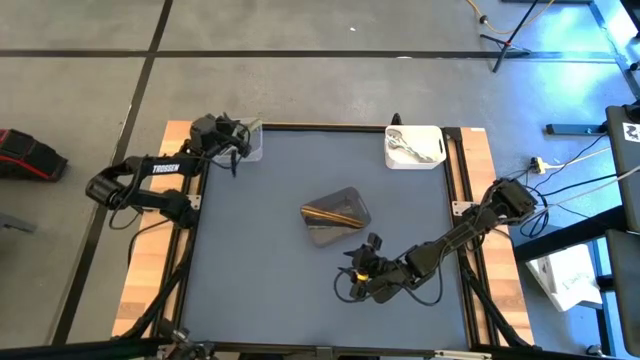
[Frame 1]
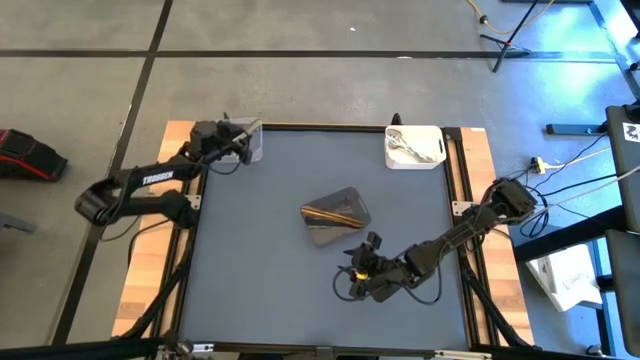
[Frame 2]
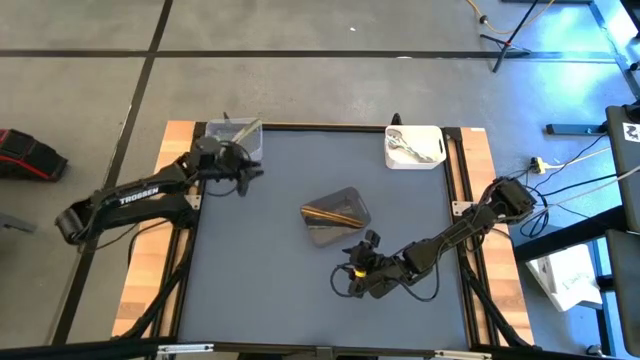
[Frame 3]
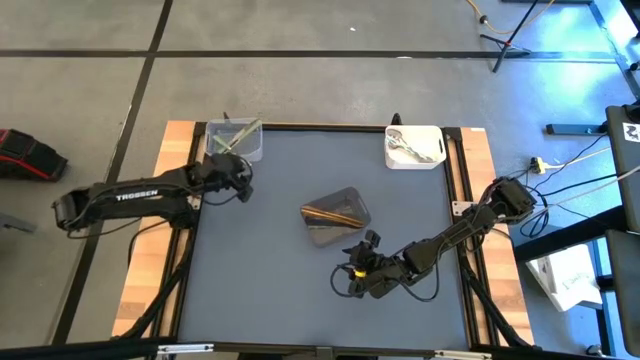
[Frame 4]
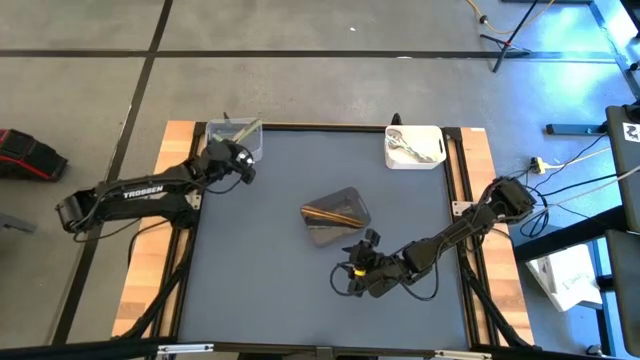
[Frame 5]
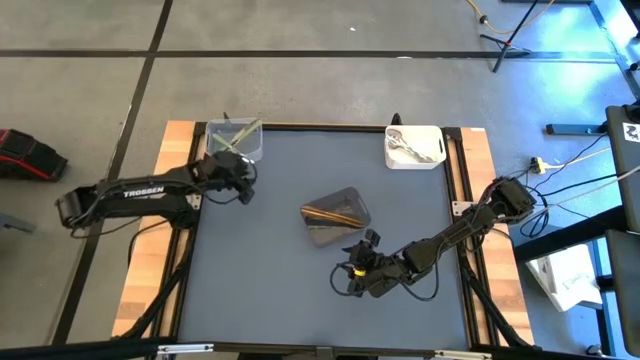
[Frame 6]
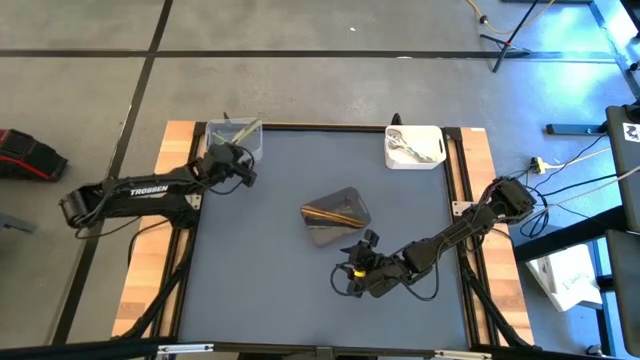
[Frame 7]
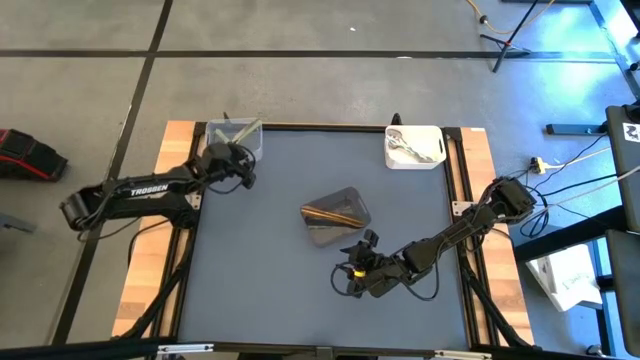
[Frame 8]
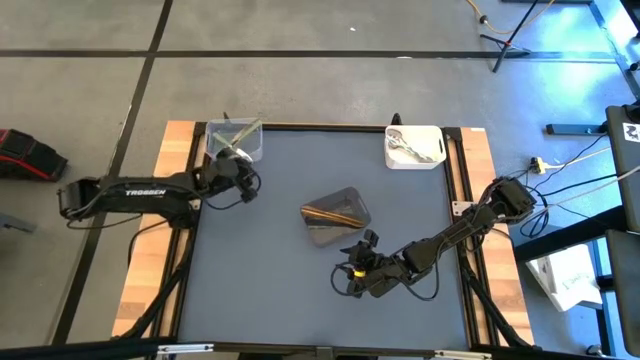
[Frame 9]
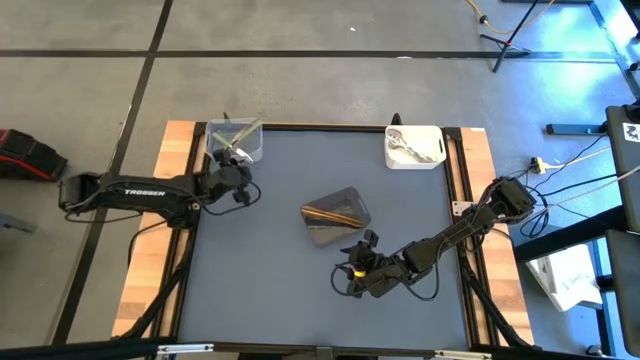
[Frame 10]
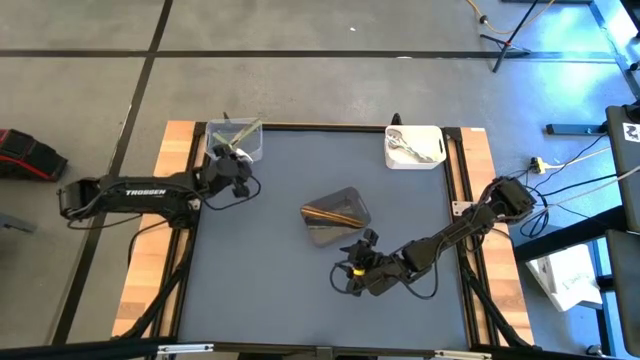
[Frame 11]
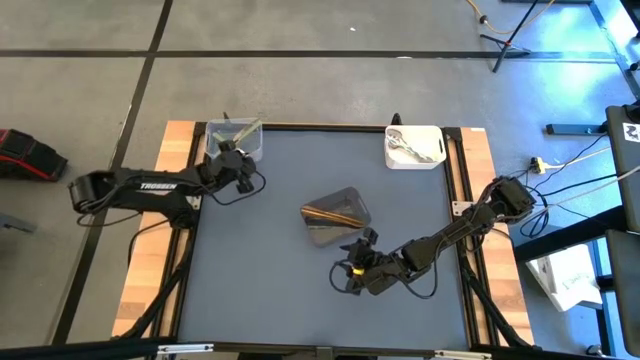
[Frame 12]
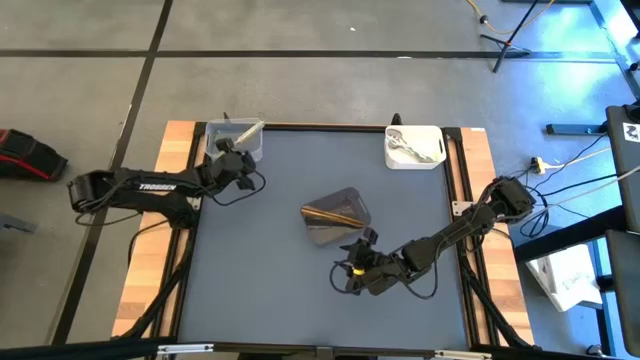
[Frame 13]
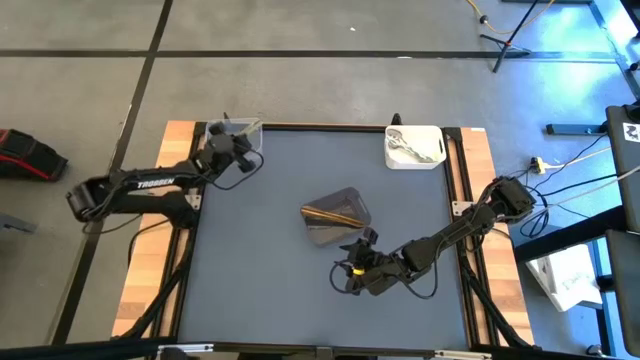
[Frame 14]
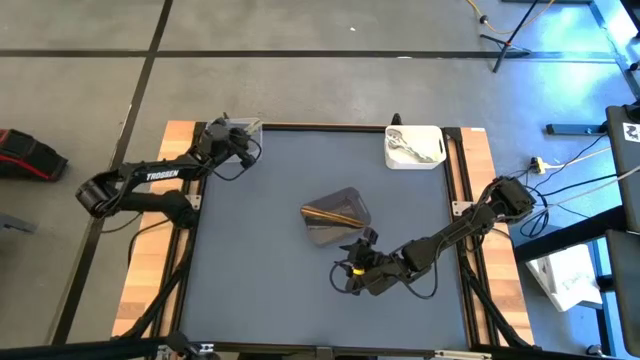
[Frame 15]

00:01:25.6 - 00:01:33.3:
Task: Sort silverware by color (type)
Adjust the green table knife in the transparent bin

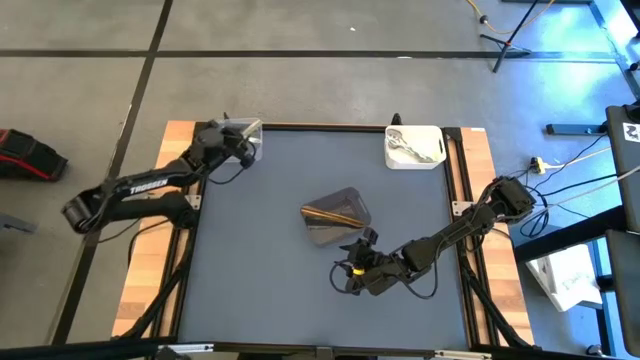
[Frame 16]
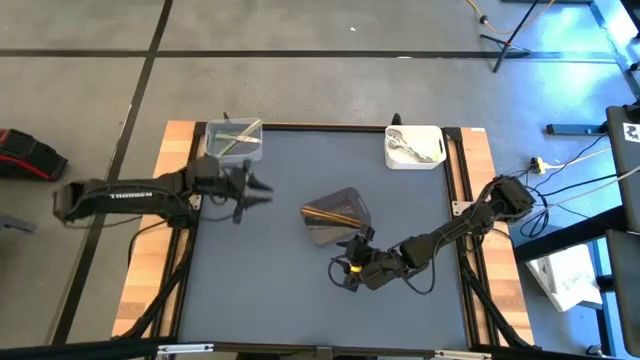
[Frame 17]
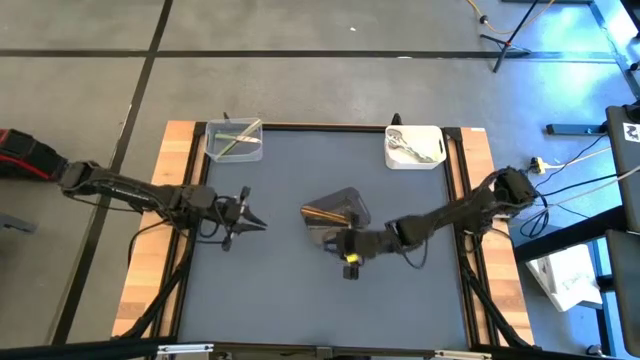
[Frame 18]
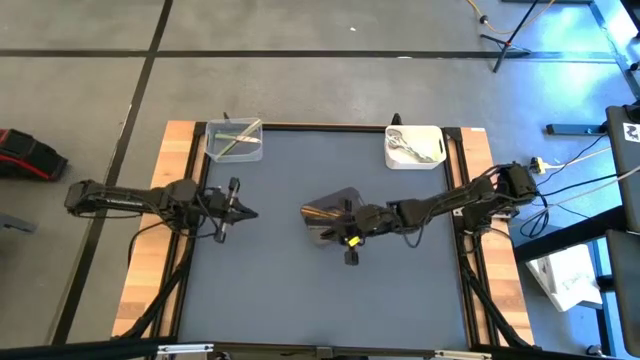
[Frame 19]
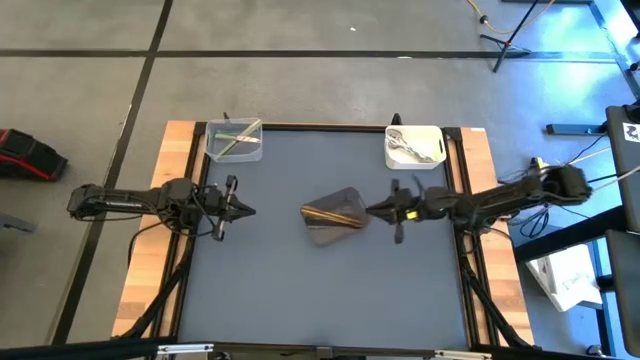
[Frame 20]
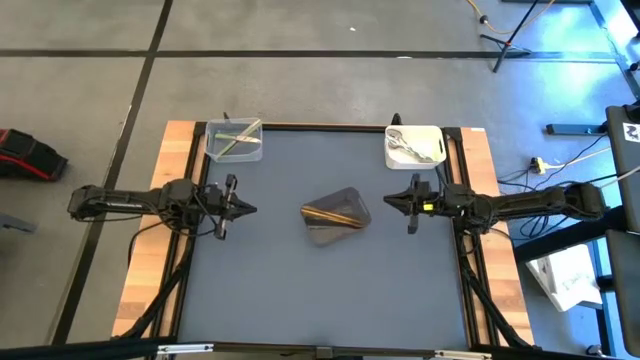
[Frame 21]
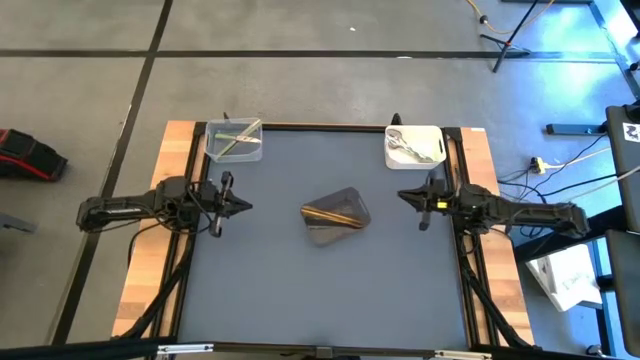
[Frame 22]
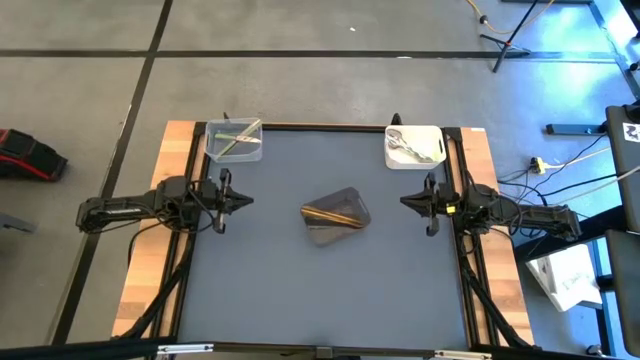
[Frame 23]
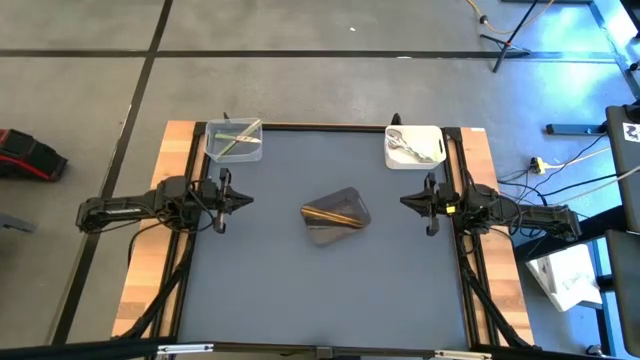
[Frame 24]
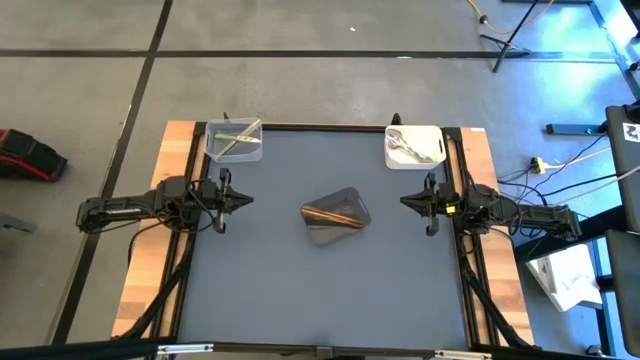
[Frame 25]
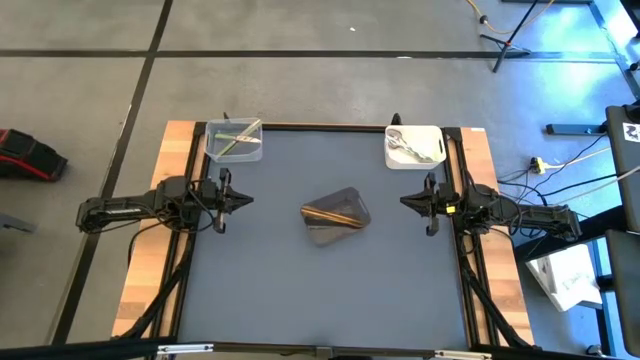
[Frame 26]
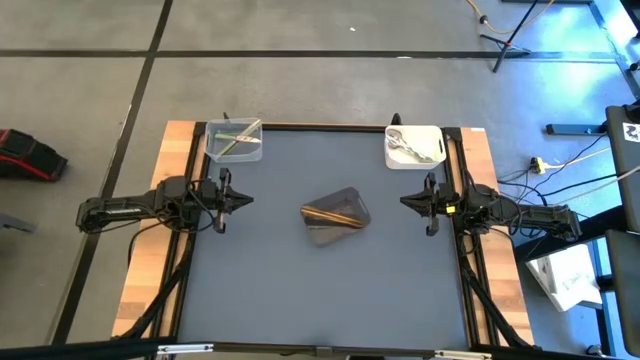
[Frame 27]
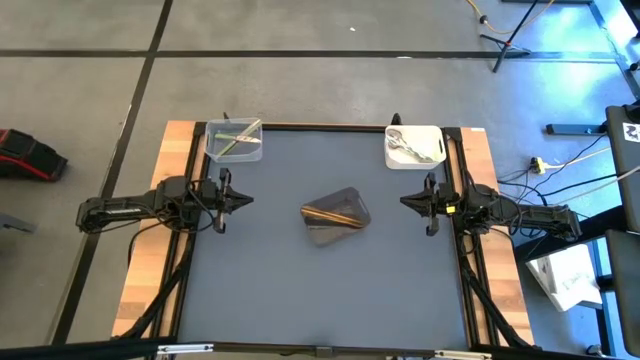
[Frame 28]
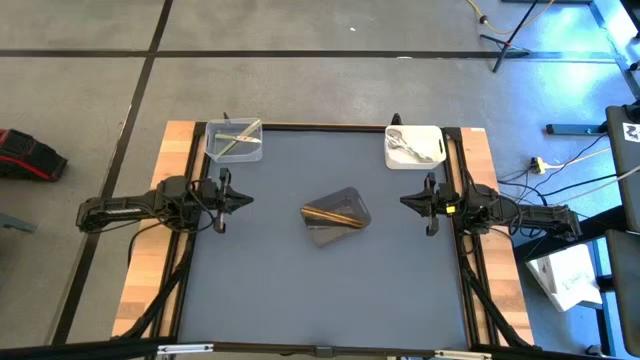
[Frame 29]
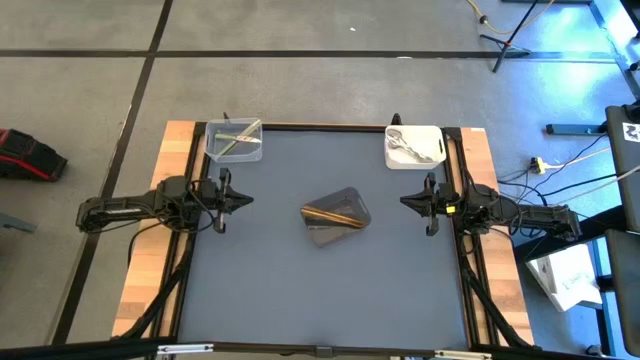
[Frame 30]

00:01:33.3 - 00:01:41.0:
Return to Home Position

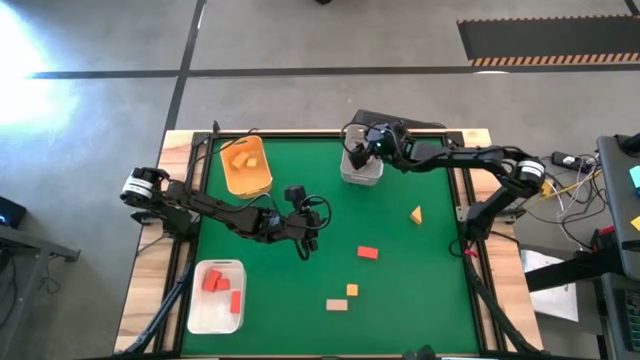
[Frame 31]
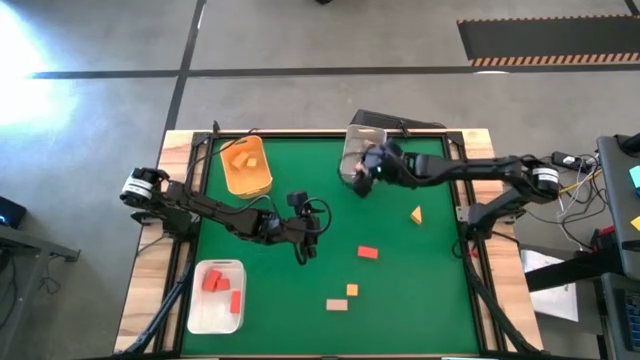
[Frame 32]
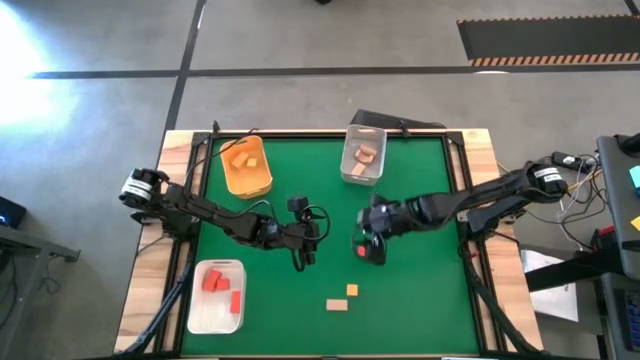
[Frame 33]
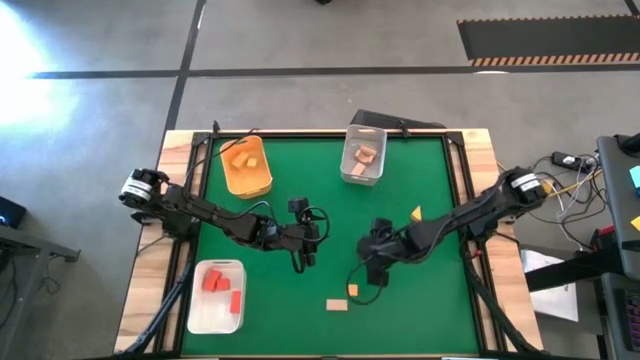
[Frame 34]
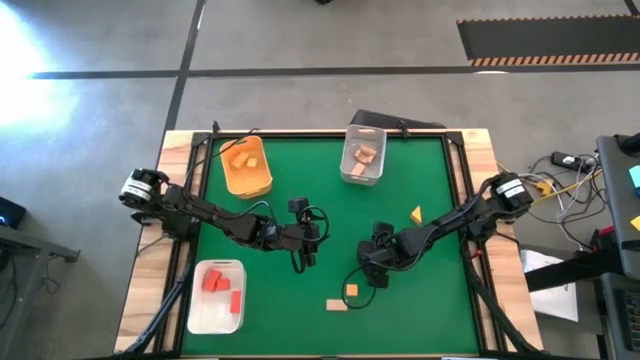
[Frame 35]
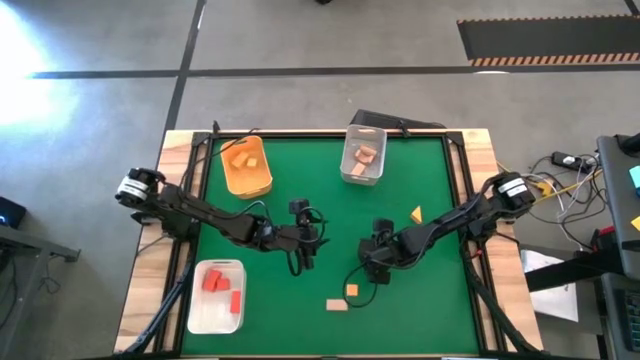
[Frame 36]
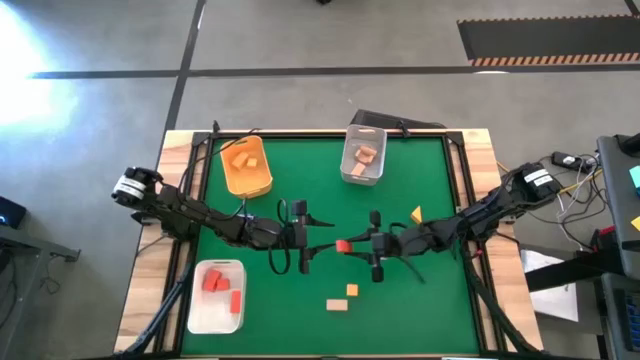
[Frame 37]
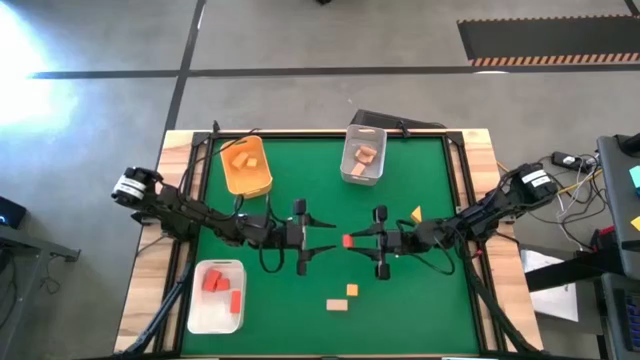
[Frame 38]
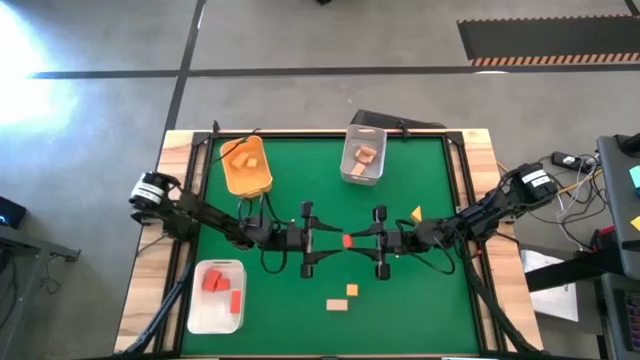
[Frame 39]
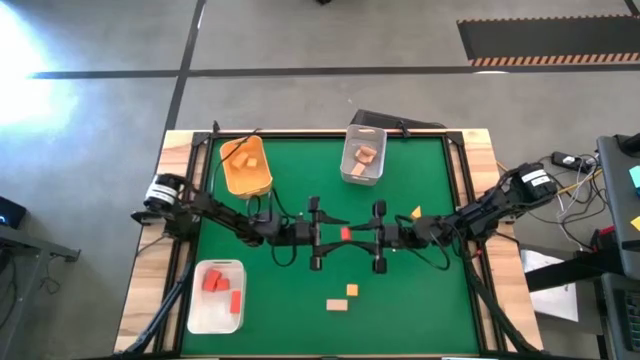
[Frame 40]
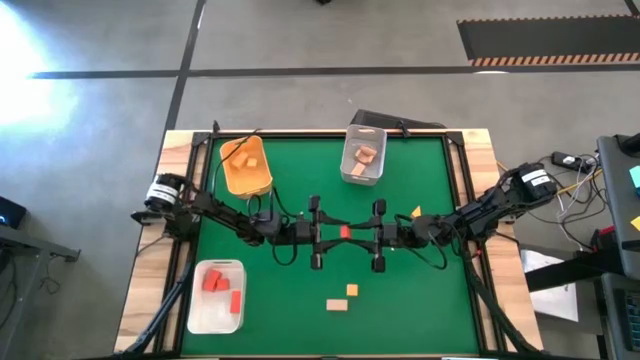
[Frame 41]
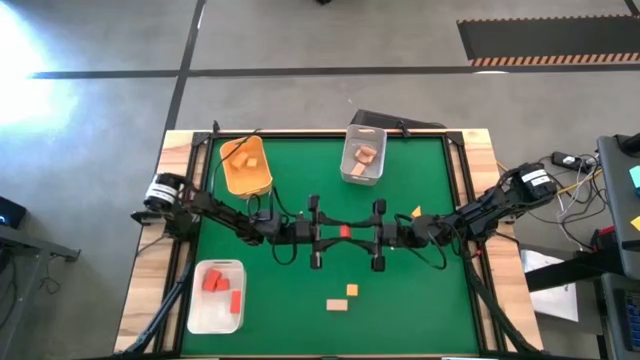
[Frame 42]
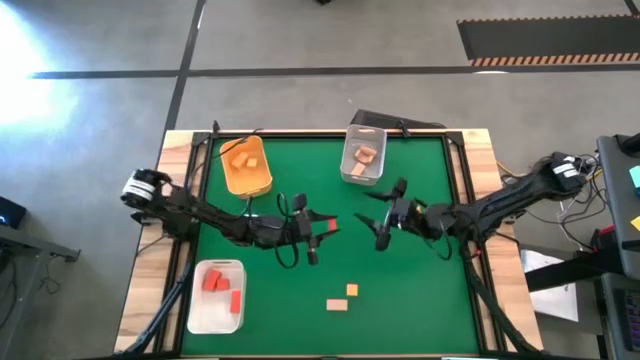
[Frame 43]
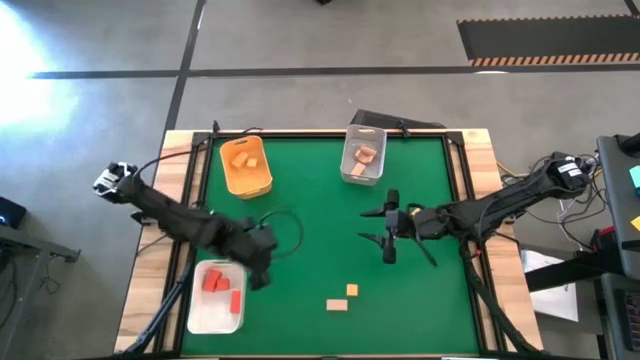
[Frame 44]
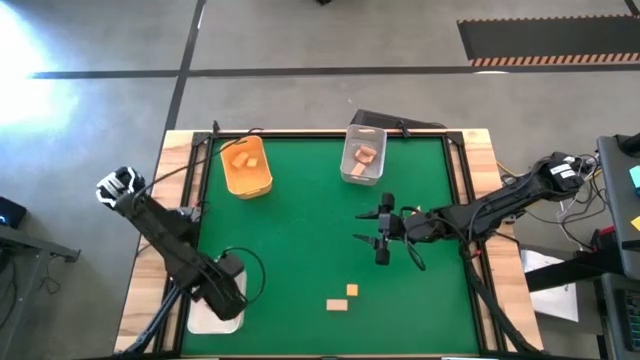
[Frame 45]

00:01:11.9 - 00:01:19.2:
Task: Sort & place blocks by color
Put the orange block into the white bin
